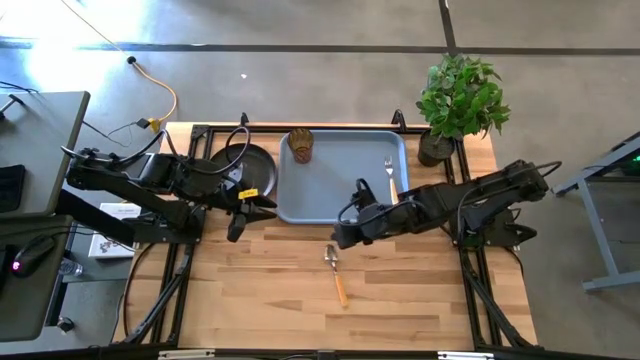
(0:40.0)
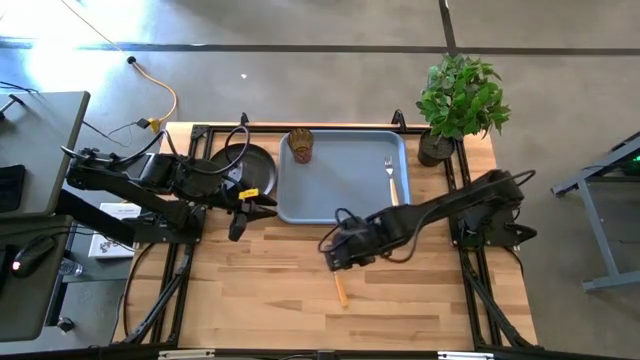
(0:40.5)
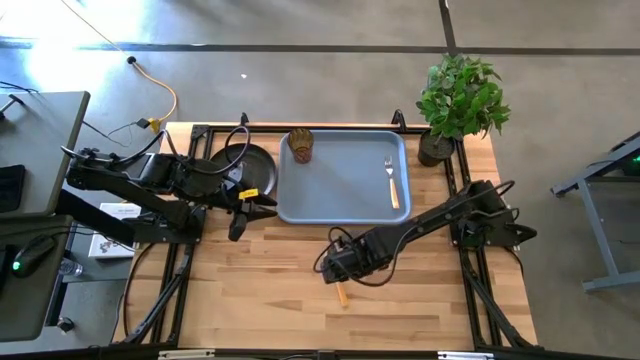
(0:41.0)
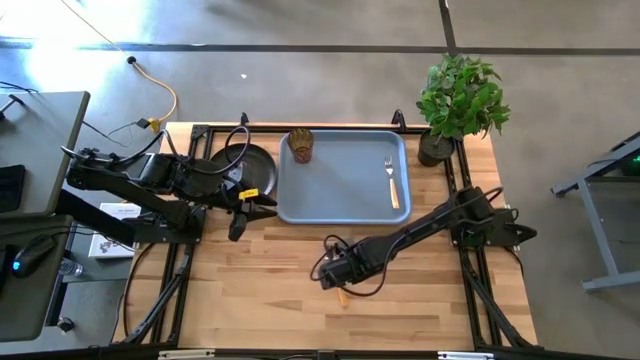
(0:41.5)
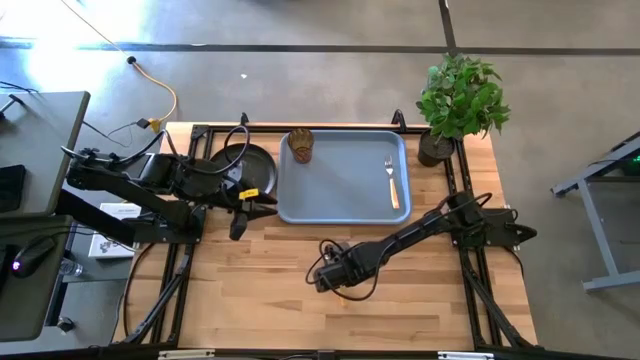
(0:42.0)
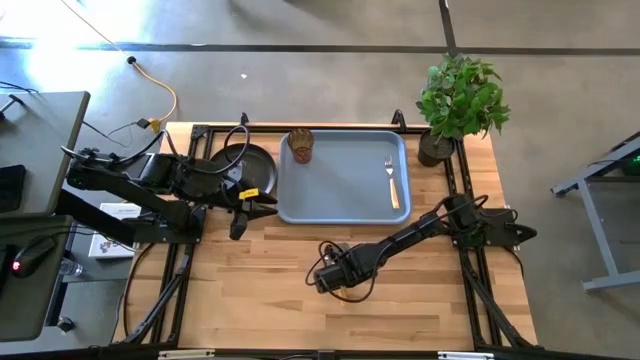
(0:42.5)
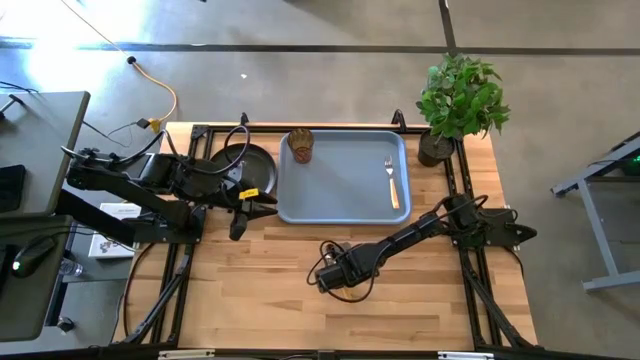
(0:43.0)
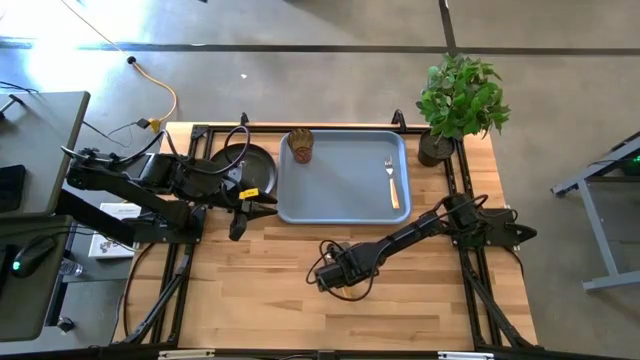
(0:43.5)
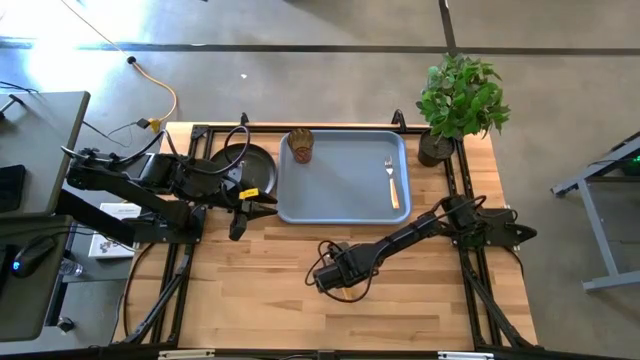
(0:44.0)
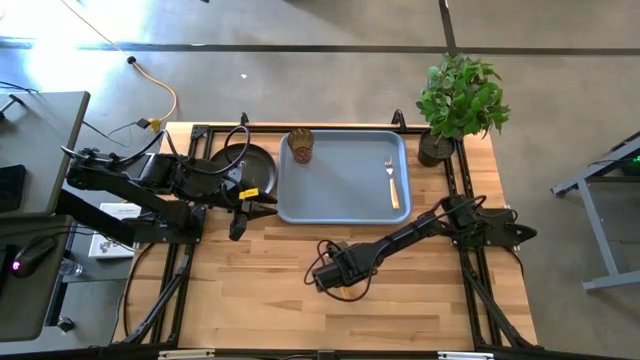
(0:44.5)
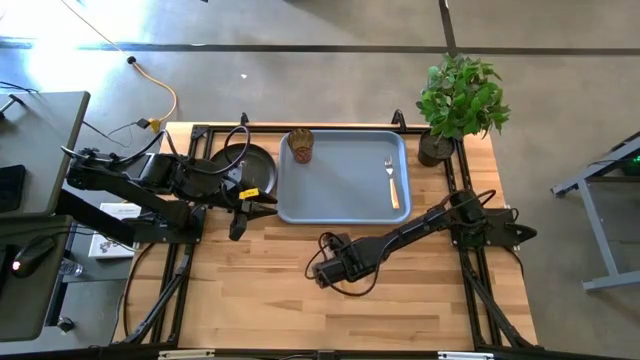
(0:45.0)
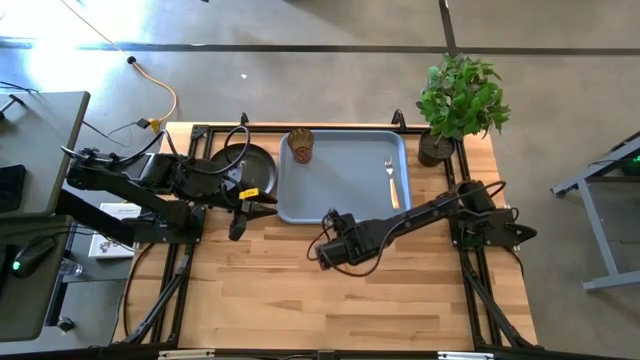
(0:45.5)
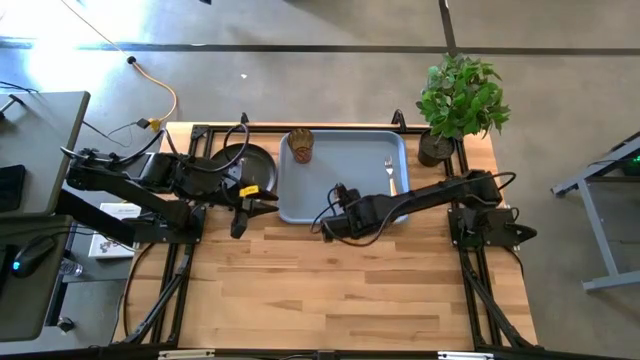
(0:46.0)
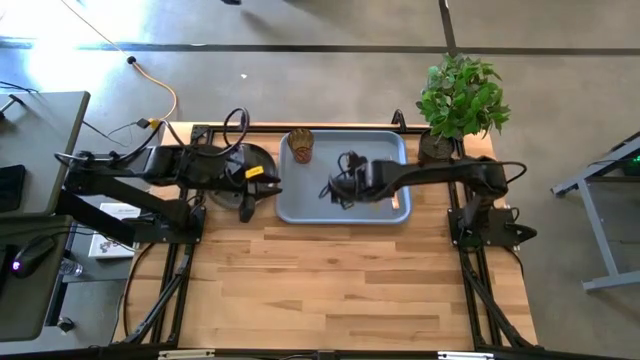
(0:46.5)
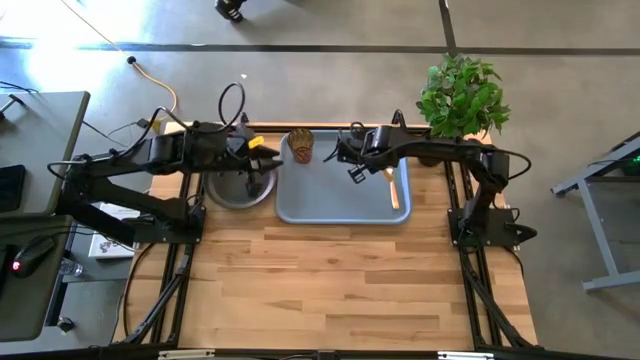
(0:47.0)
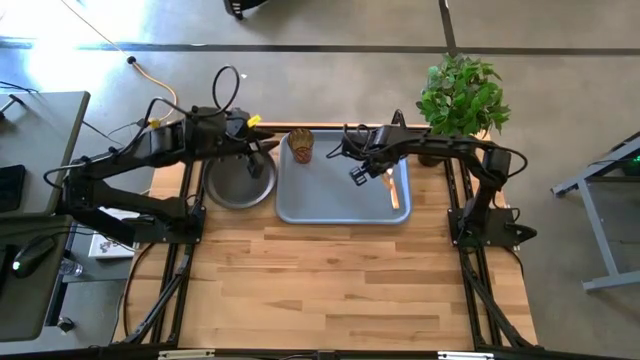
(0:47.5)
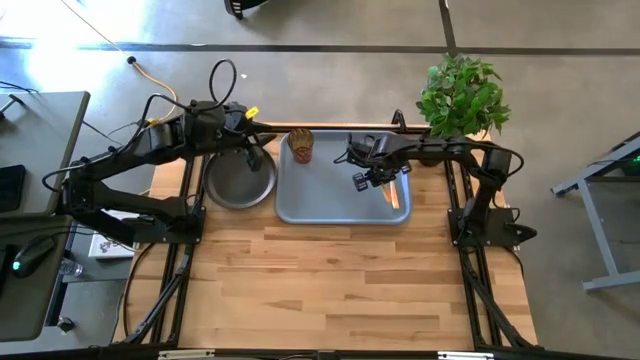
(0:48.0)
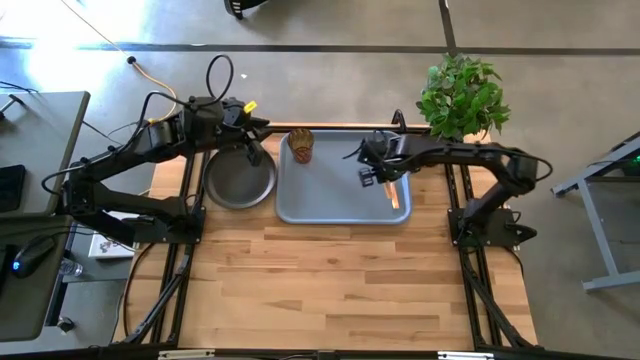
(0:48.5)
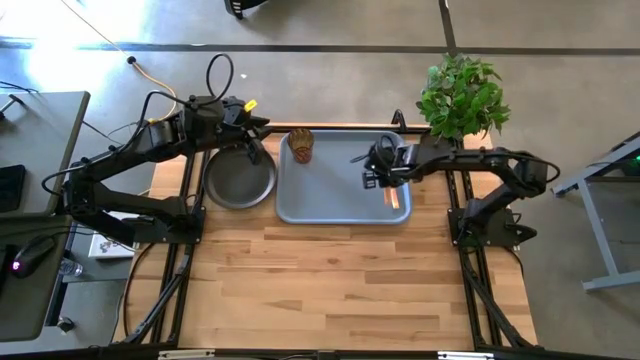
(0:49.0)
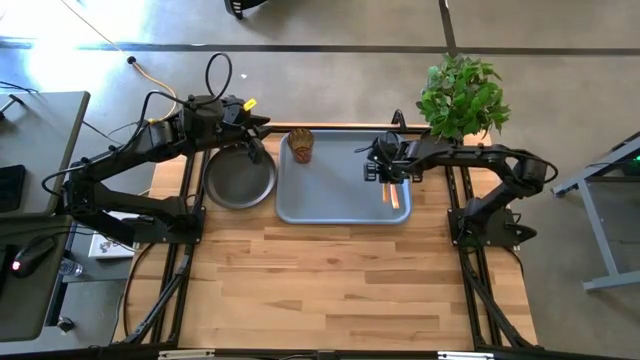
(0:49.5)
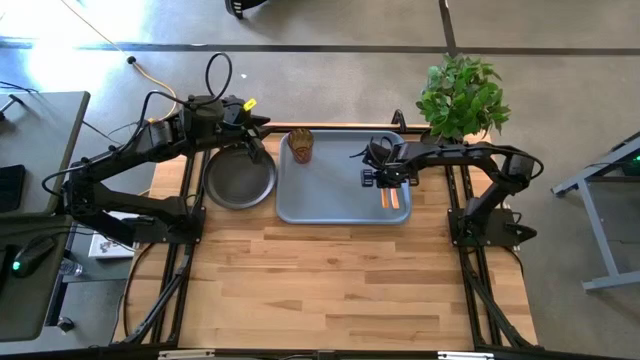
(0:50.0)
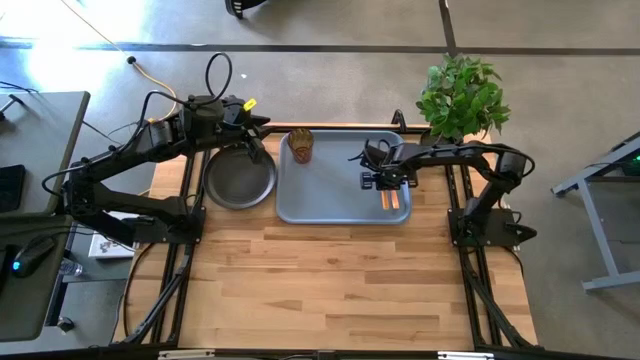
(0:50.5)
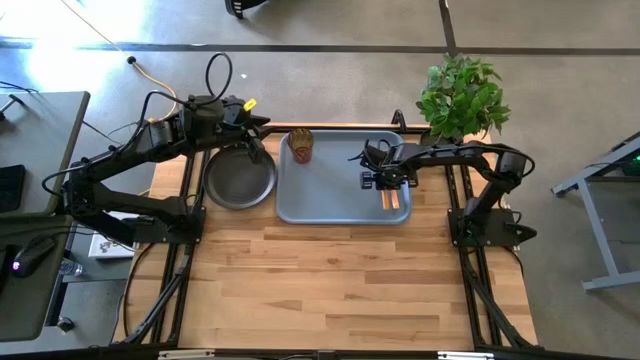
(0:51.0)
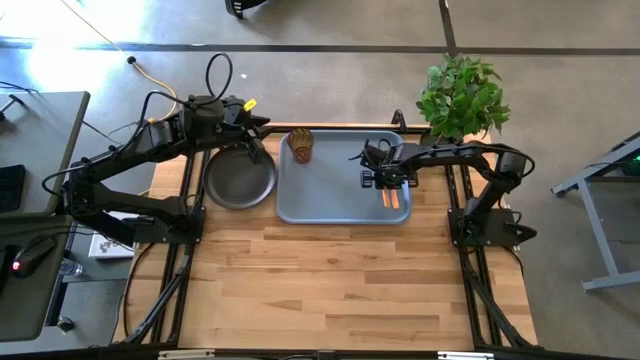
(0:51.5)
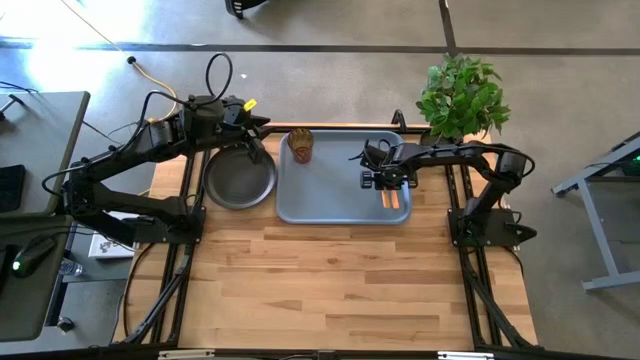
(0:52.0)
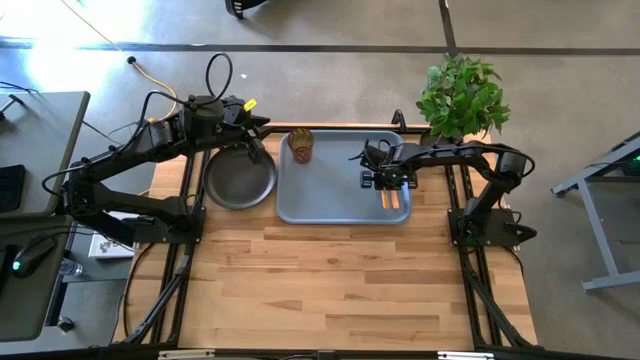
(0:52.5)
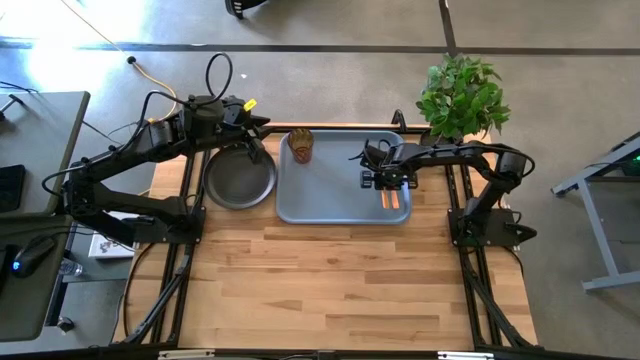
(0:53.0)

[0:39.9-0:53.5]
Task: Pick and place plate/cup/fork/spoon on tray
Put the orange spoon on the gray serving tray

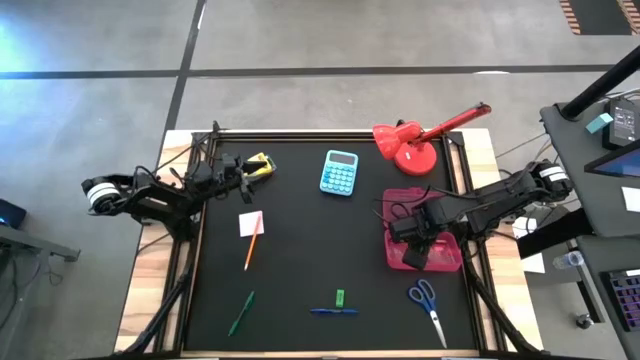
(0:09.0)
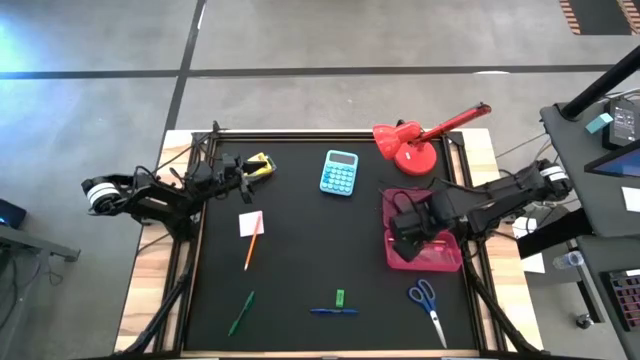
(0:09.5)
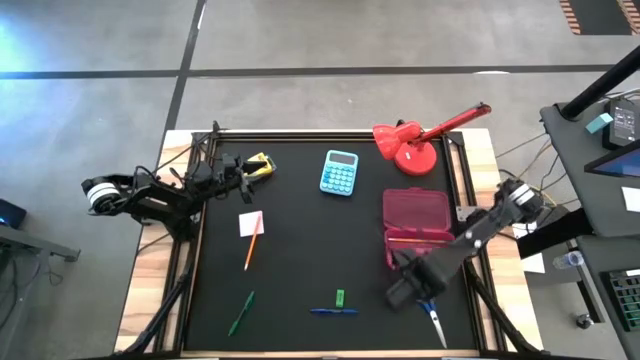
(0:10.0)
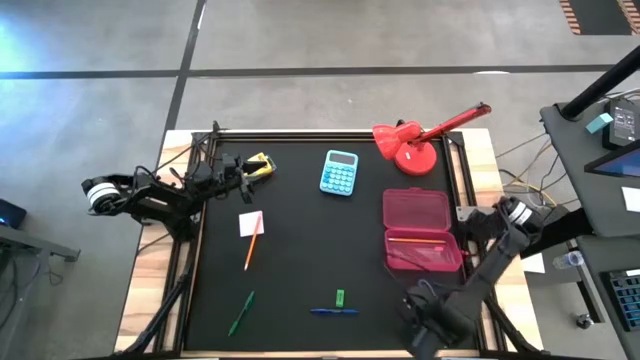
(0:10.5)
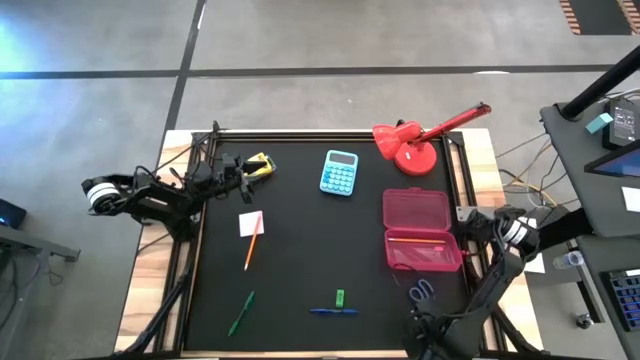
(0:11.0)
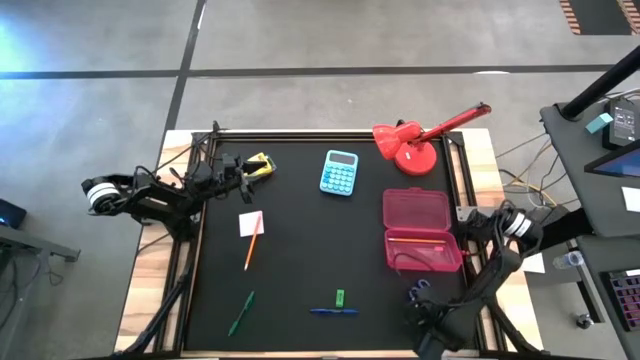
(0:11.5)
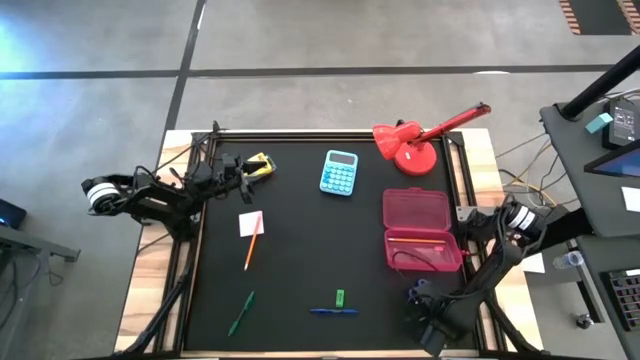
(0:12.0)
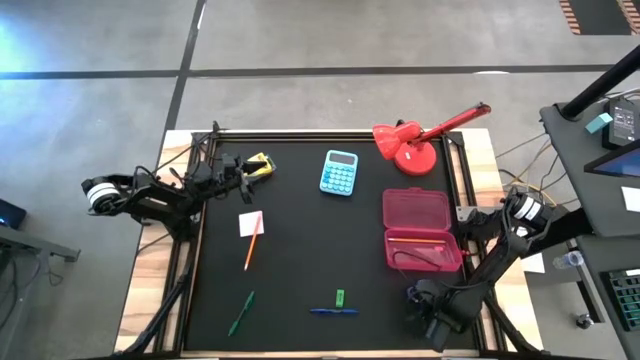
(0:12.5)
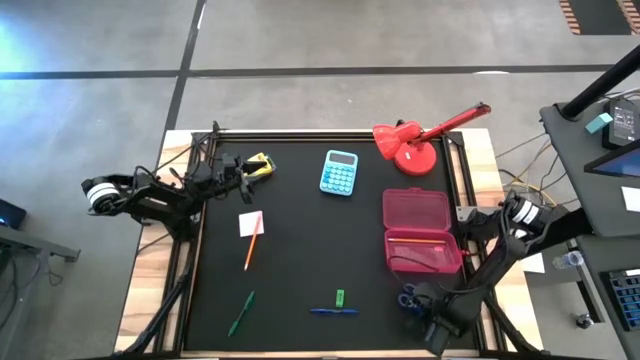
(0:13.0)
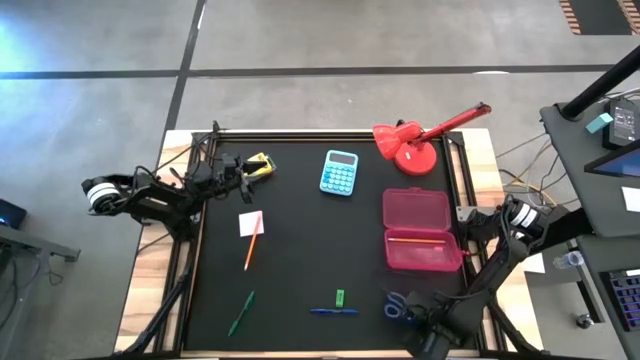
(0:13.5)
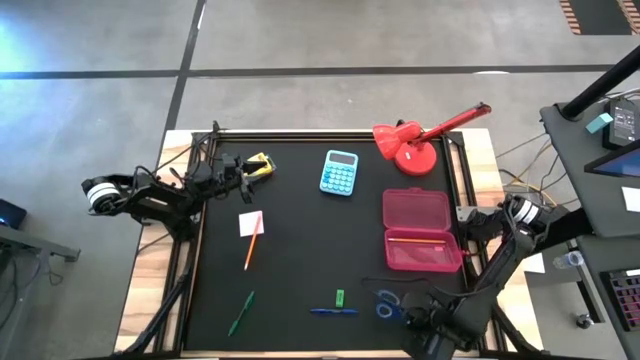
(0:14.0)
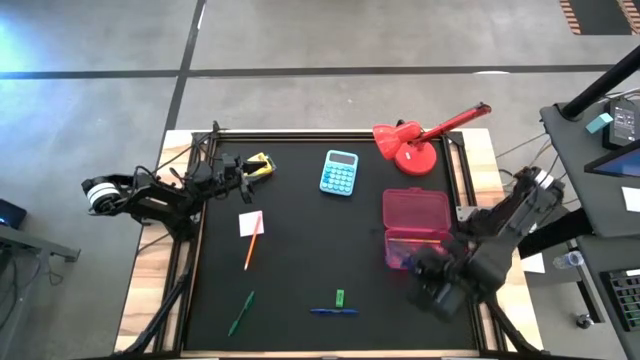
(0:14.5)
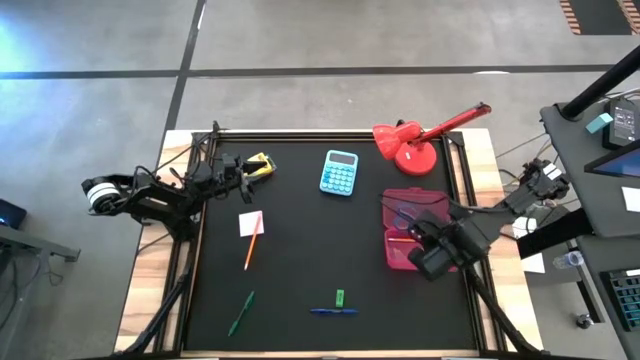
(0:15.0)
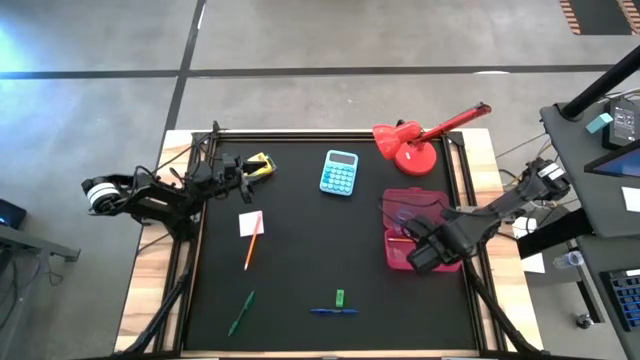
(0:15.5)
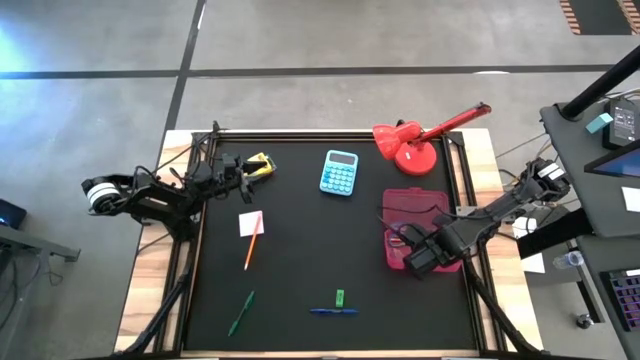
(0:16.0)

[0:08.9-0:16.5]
Task: Pack school essentials
Put the blue scissors into the pink supply box
